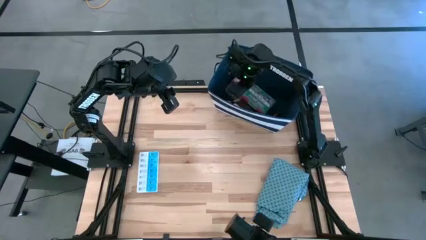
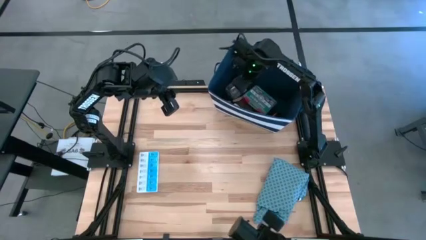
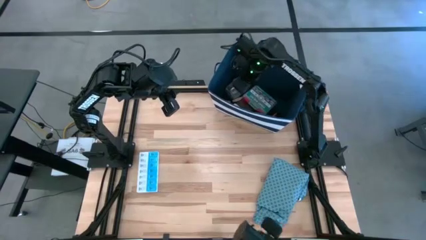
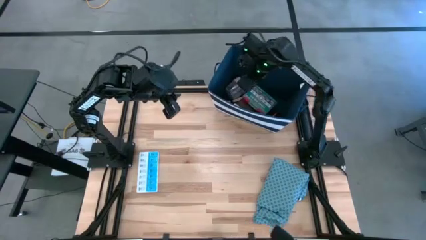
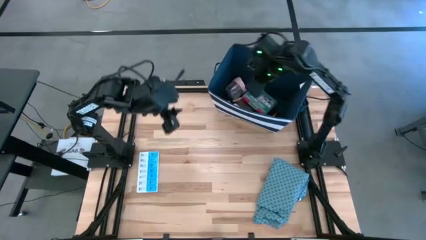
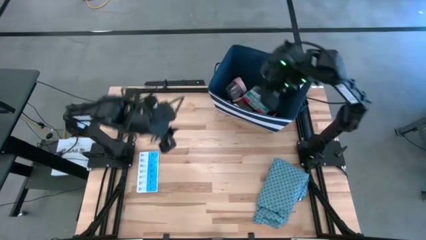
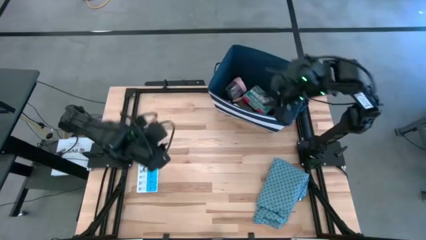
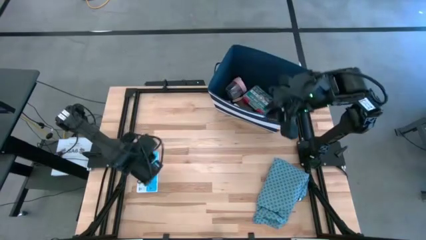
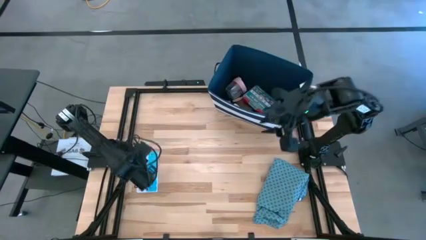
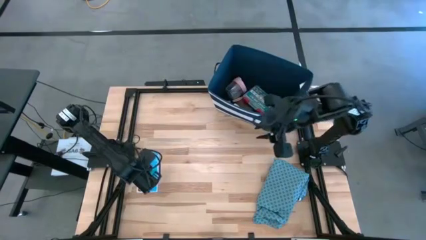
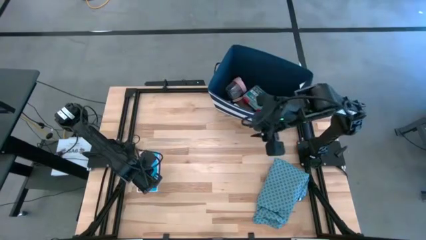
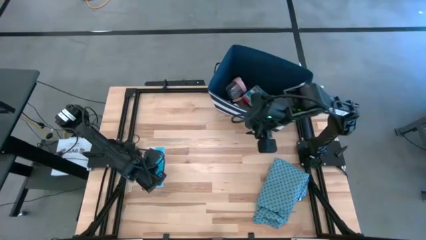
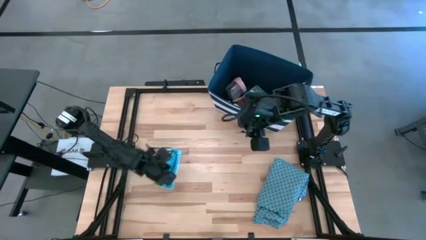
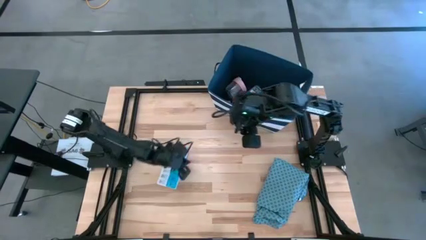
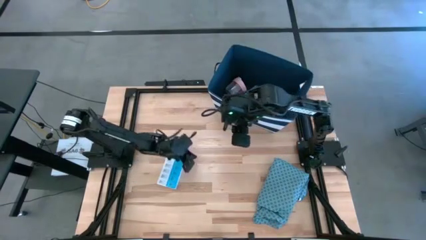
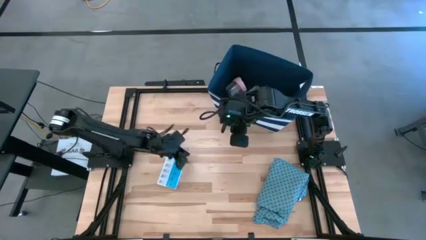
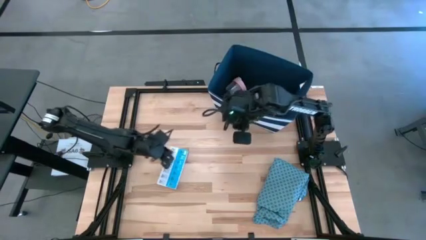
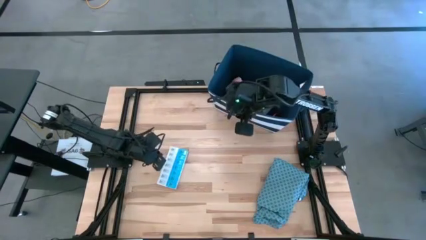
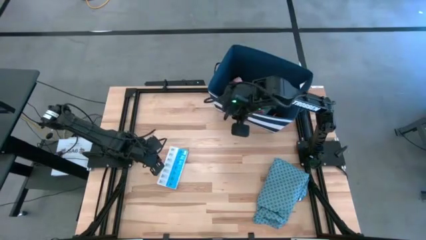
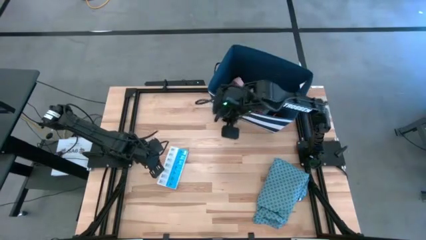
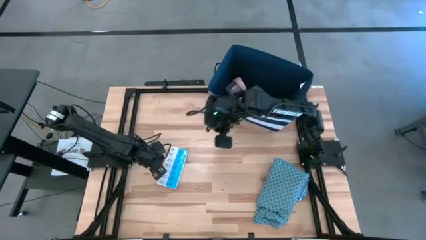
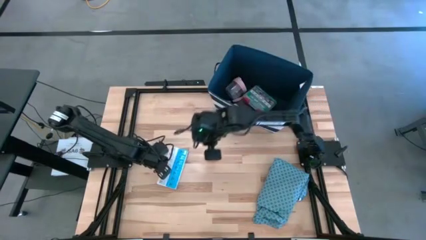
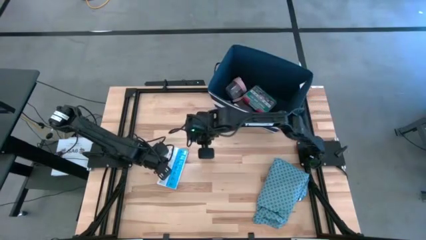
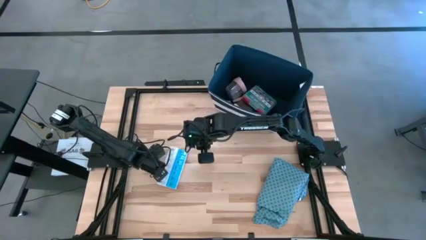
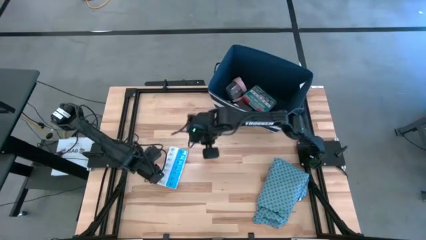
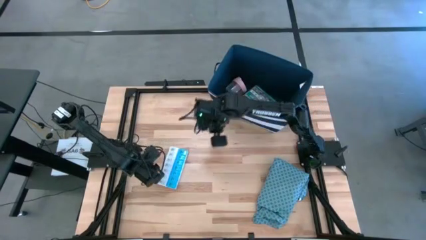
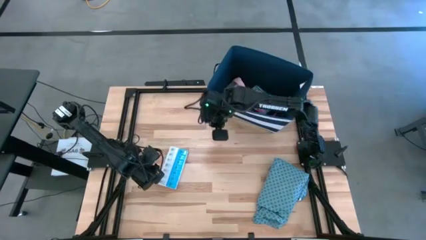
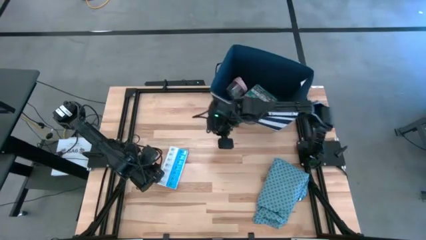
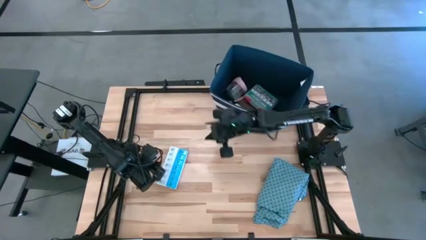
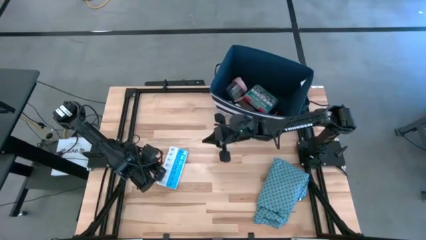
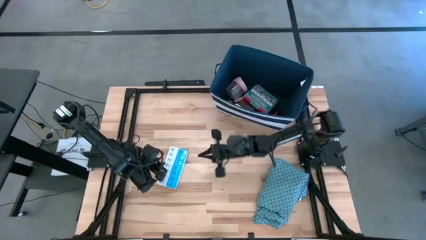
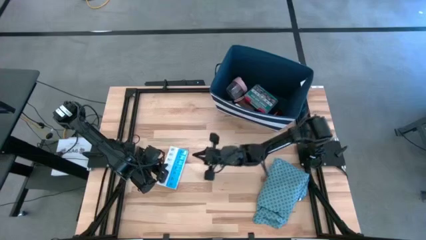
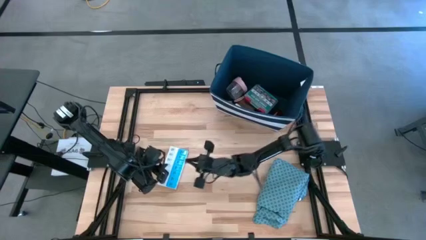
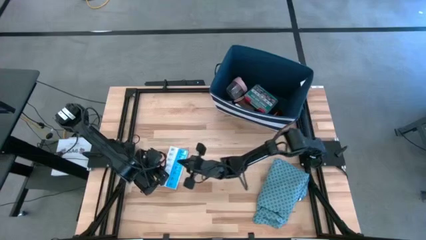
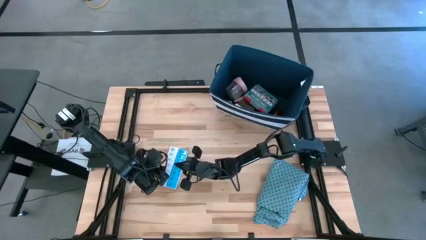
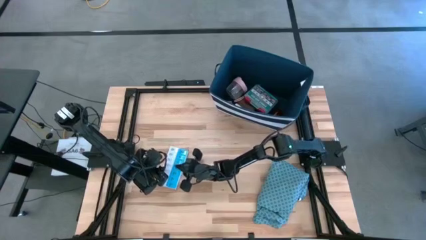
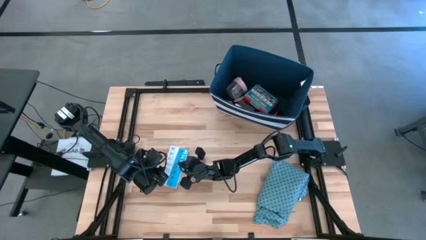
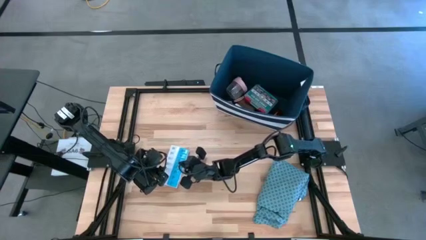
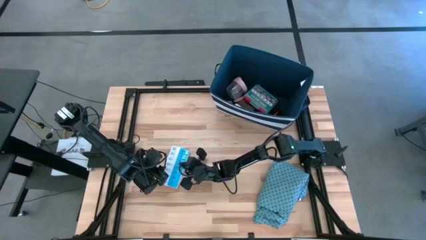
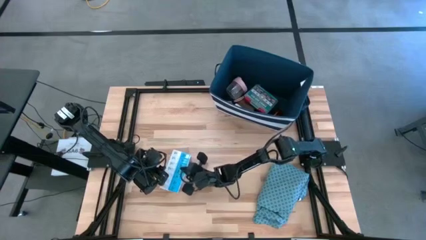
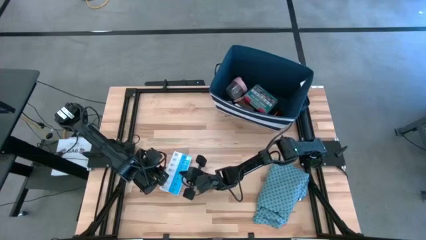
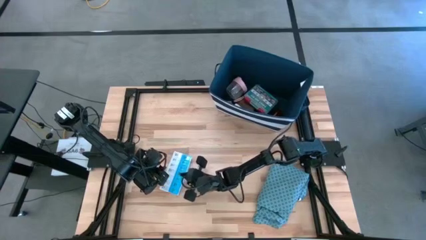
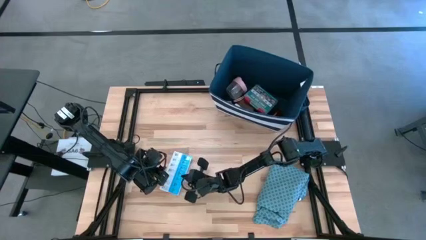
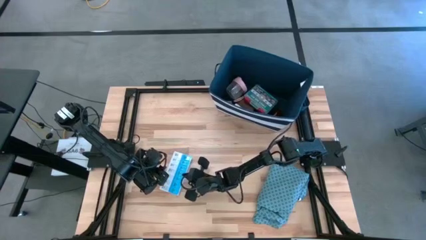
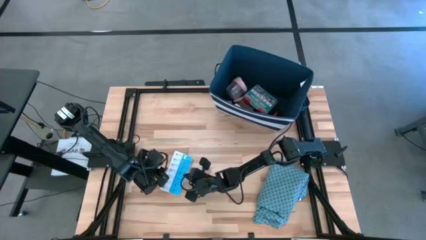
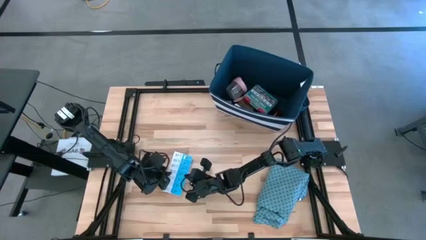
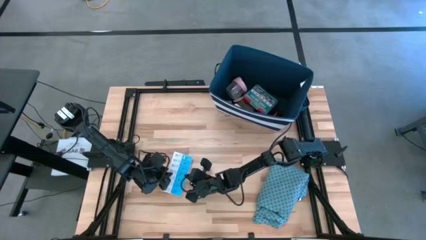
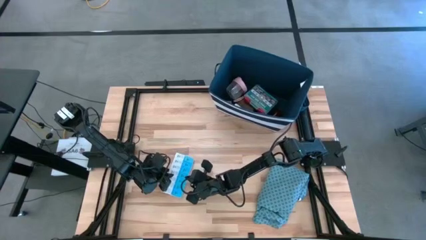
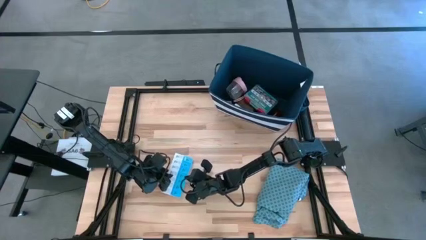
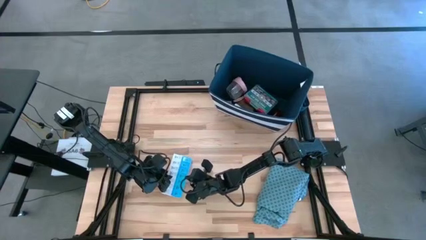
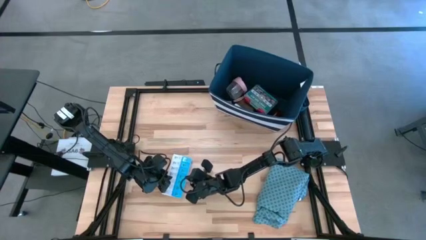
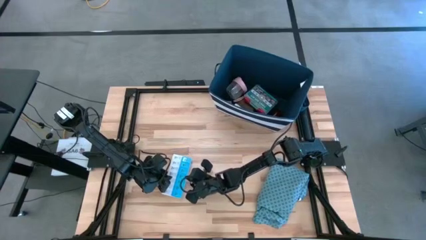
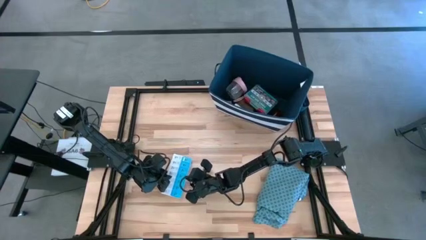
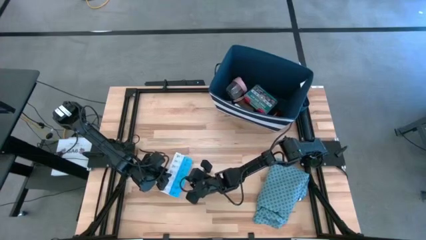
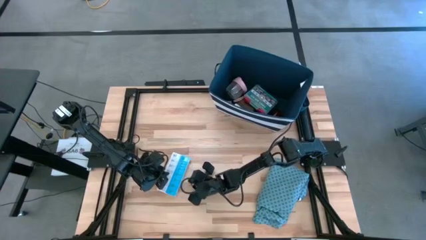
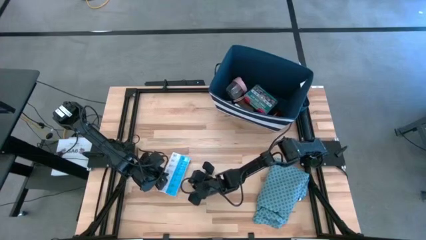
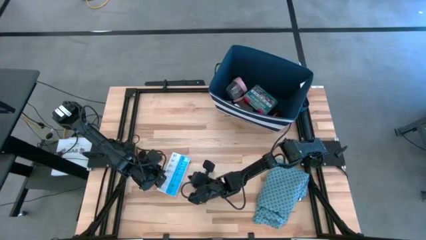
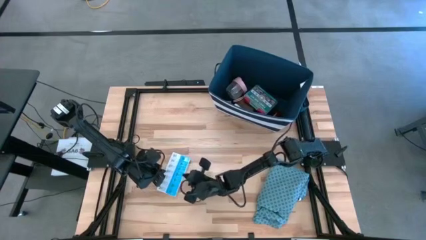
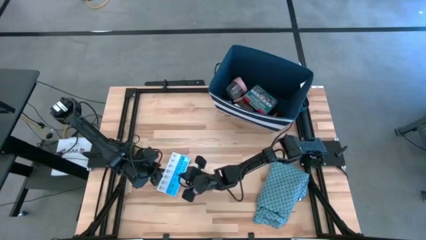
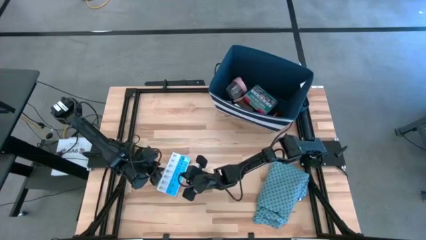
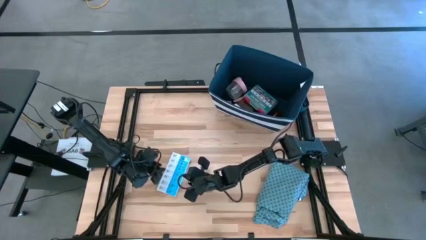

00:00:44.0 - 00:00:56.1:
Task: Pick & place medical supplies in basket/bin
Put the white pill organizer into the white bin
